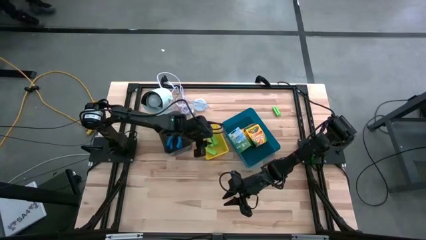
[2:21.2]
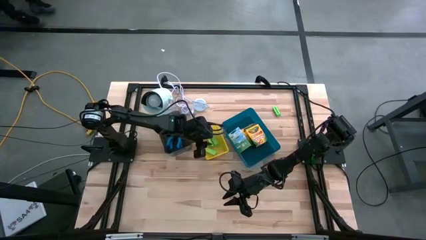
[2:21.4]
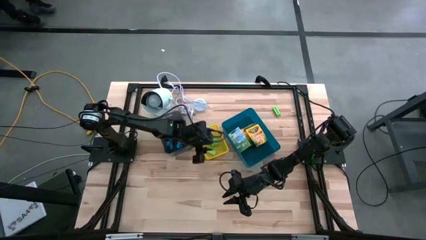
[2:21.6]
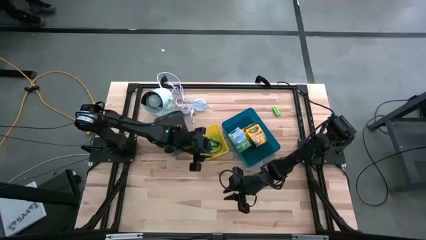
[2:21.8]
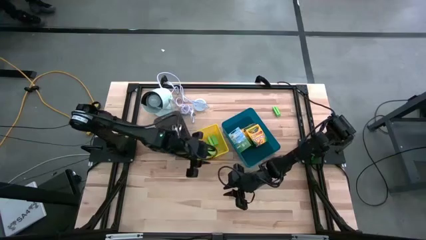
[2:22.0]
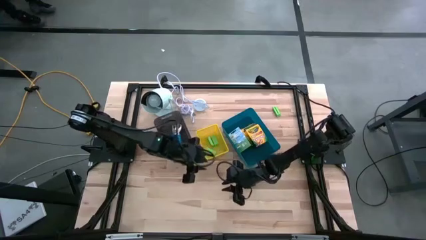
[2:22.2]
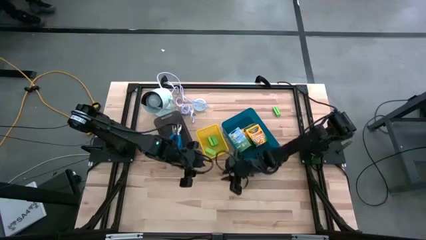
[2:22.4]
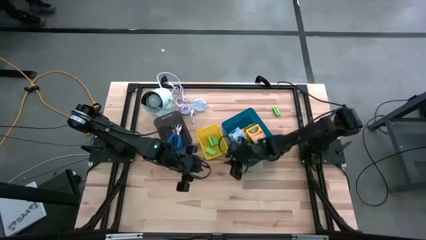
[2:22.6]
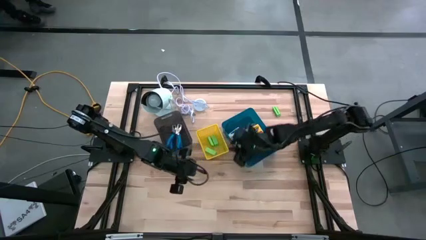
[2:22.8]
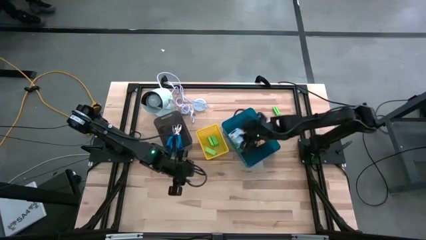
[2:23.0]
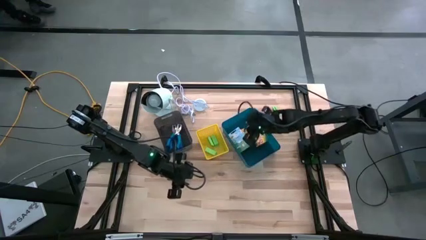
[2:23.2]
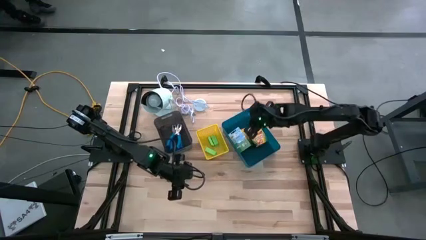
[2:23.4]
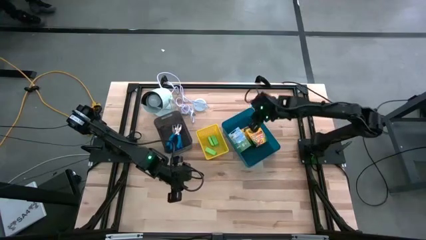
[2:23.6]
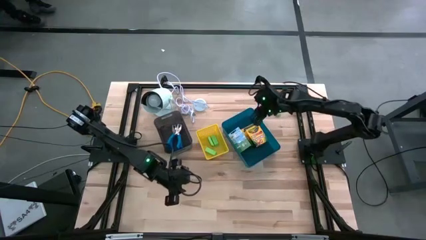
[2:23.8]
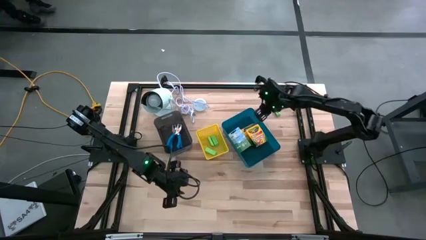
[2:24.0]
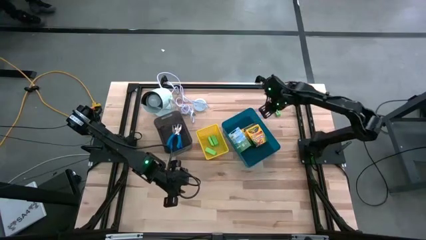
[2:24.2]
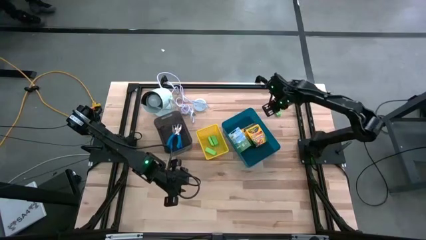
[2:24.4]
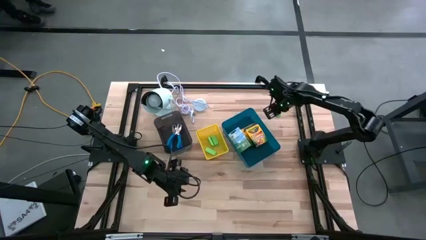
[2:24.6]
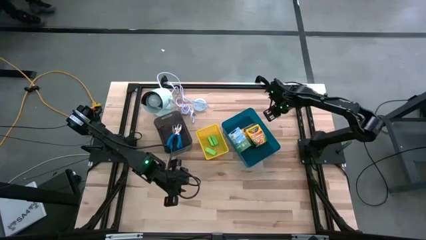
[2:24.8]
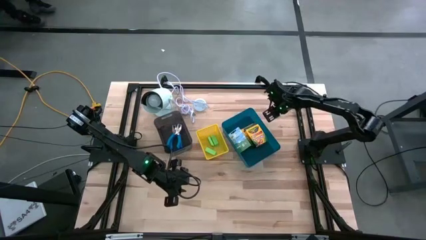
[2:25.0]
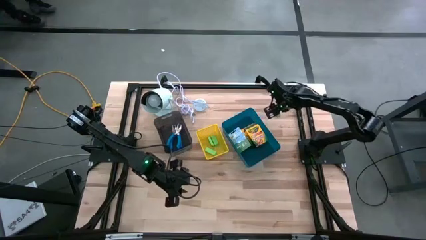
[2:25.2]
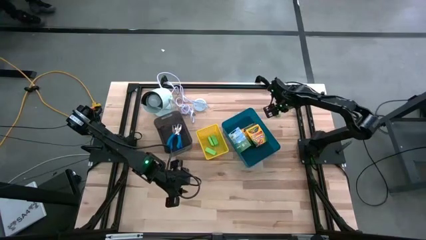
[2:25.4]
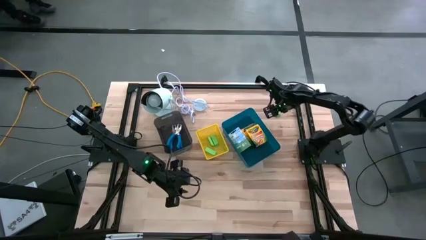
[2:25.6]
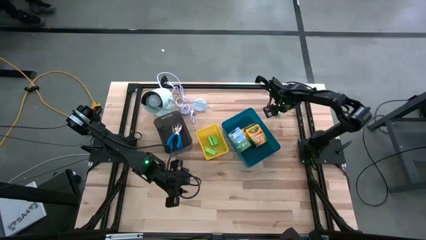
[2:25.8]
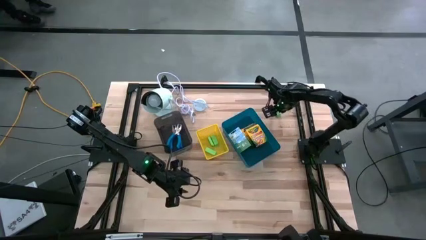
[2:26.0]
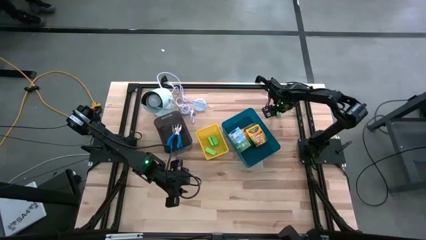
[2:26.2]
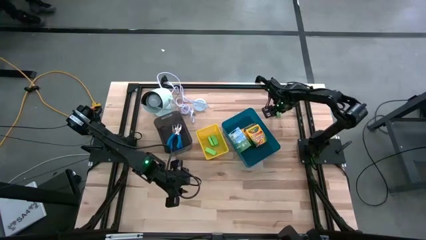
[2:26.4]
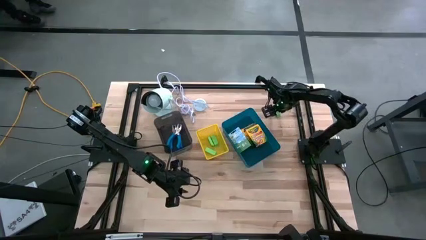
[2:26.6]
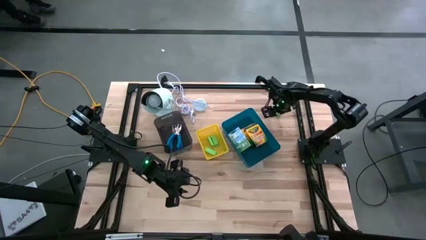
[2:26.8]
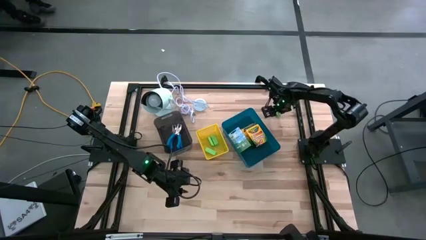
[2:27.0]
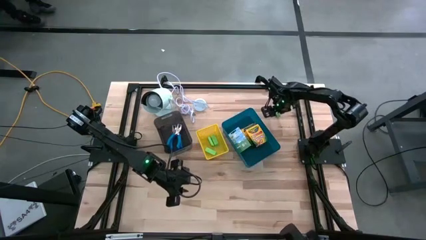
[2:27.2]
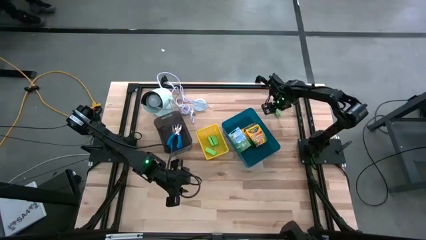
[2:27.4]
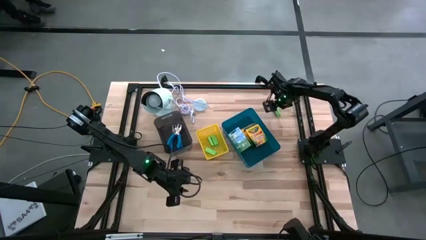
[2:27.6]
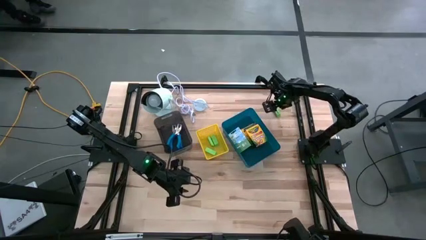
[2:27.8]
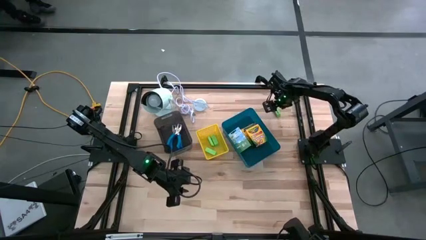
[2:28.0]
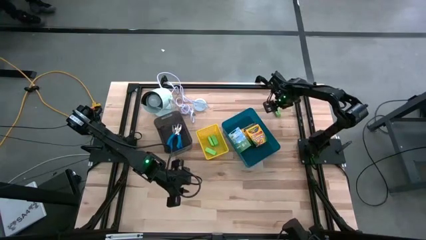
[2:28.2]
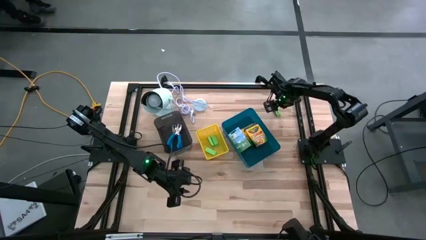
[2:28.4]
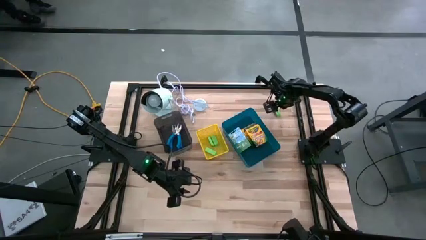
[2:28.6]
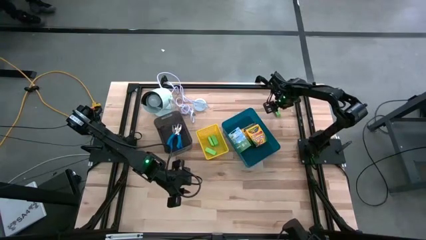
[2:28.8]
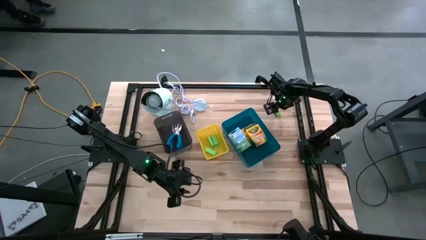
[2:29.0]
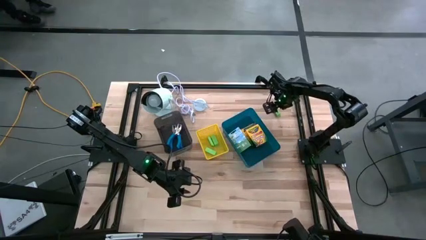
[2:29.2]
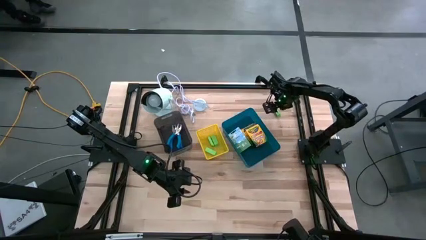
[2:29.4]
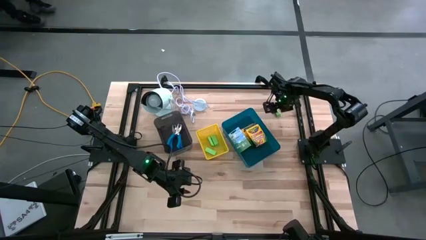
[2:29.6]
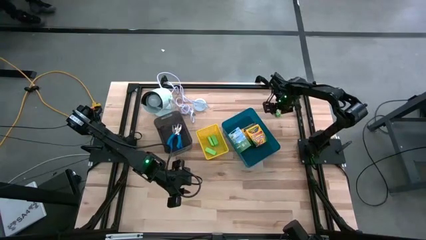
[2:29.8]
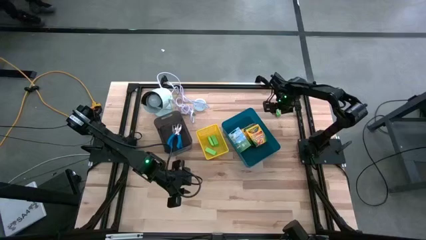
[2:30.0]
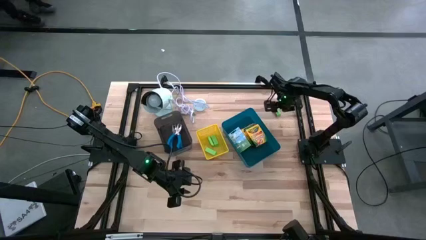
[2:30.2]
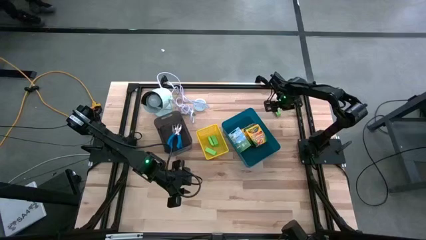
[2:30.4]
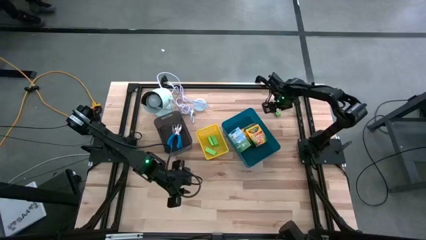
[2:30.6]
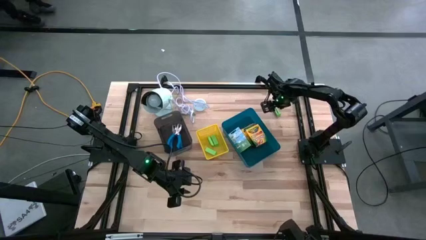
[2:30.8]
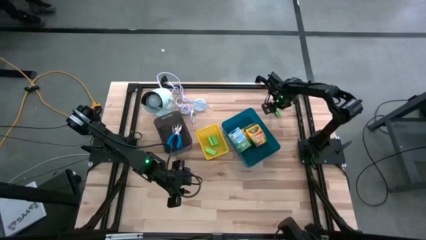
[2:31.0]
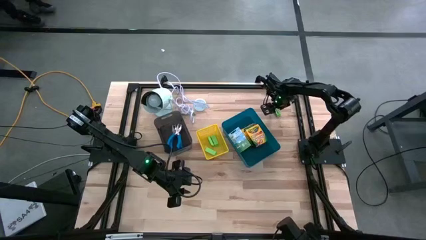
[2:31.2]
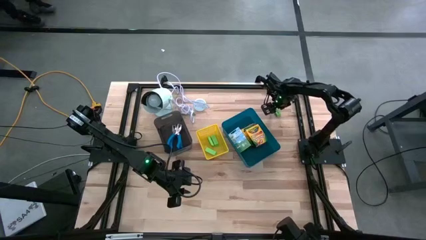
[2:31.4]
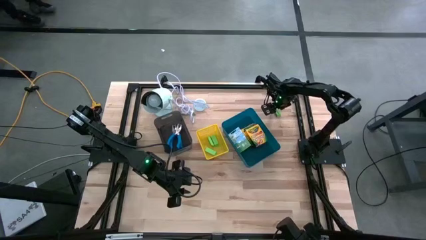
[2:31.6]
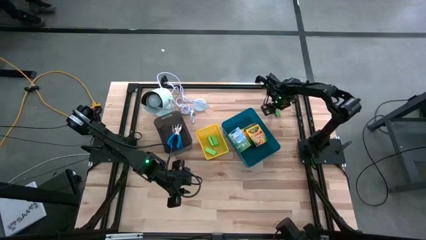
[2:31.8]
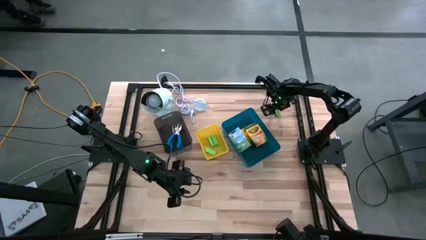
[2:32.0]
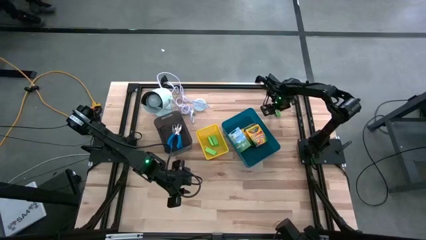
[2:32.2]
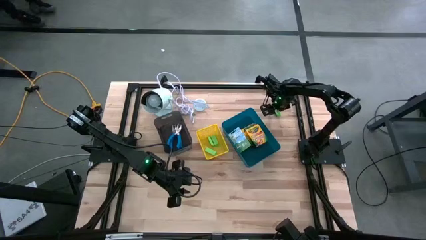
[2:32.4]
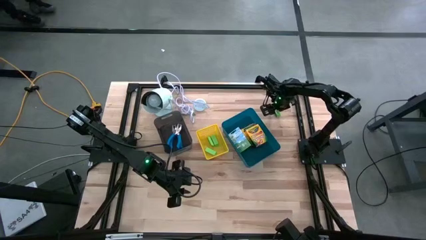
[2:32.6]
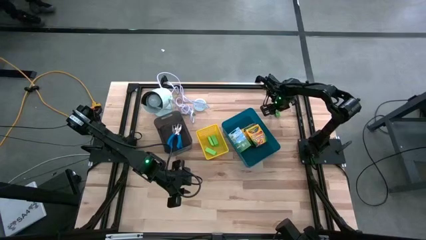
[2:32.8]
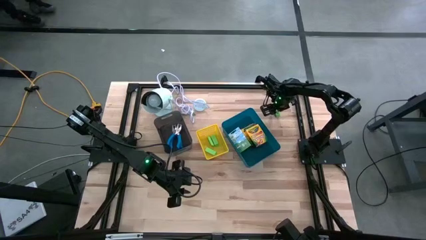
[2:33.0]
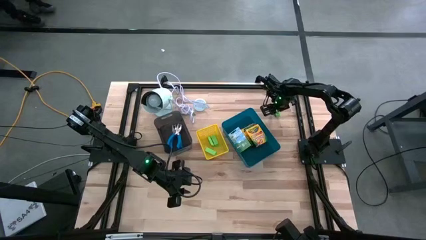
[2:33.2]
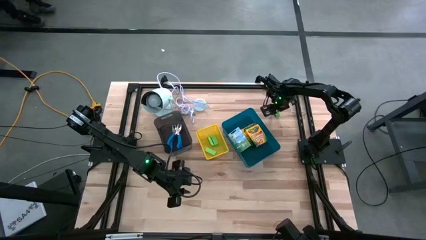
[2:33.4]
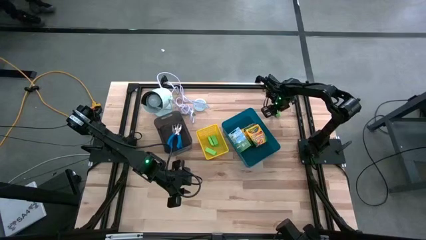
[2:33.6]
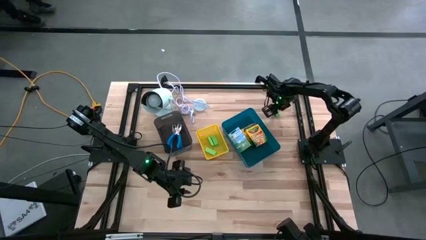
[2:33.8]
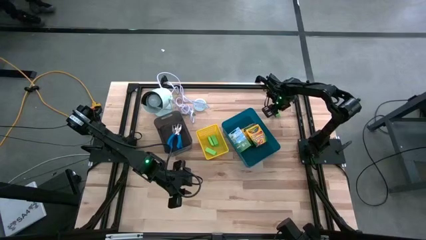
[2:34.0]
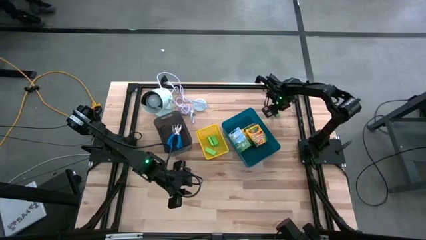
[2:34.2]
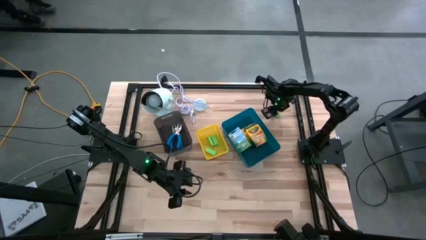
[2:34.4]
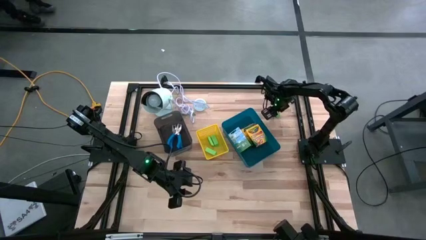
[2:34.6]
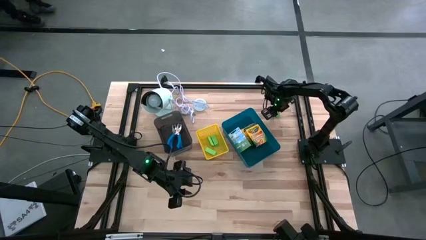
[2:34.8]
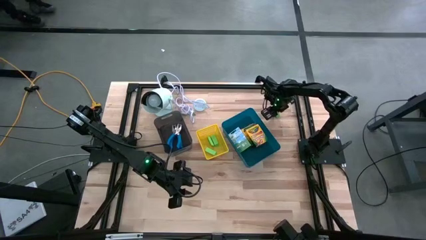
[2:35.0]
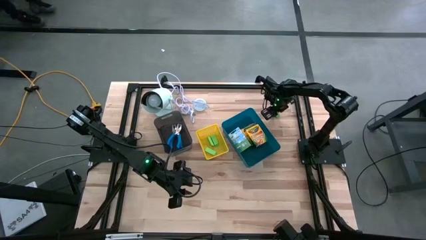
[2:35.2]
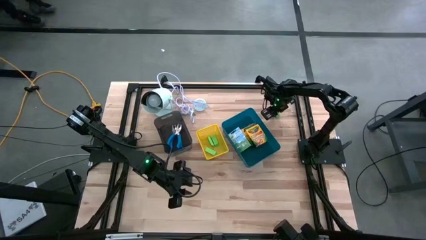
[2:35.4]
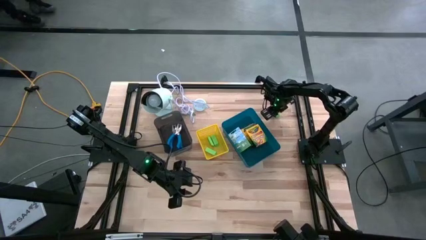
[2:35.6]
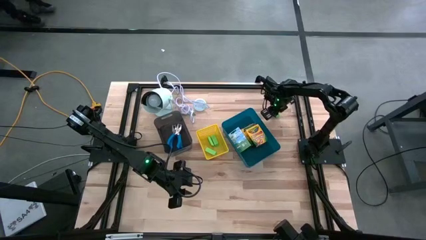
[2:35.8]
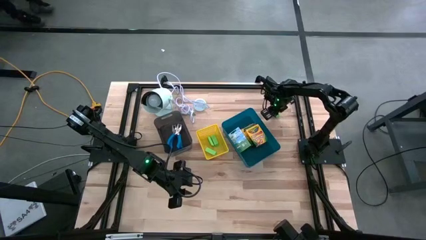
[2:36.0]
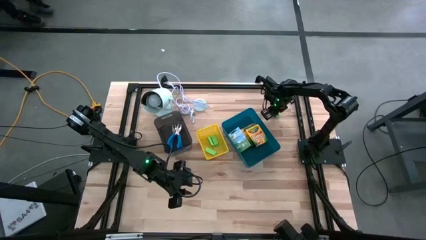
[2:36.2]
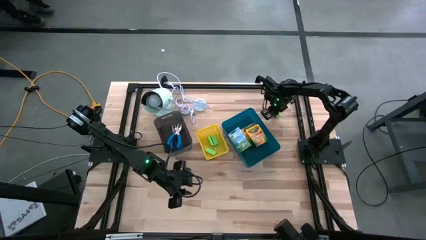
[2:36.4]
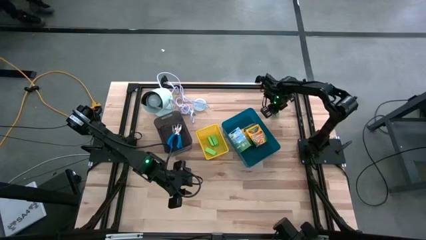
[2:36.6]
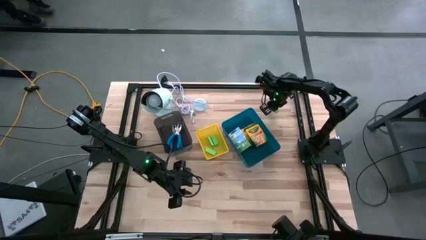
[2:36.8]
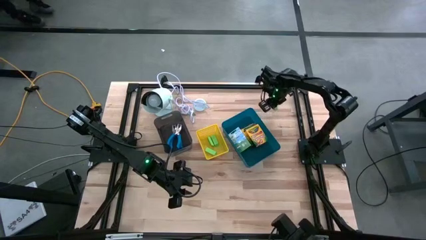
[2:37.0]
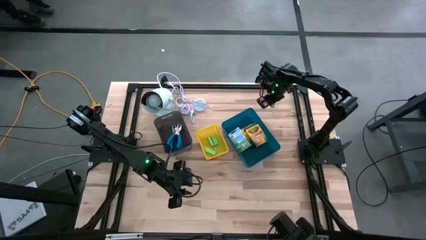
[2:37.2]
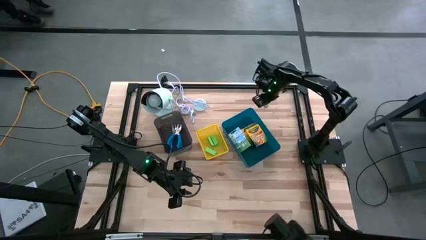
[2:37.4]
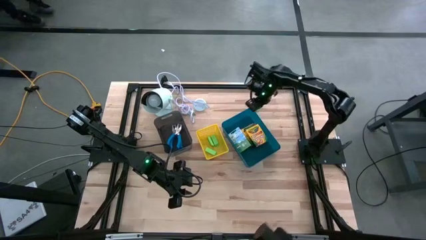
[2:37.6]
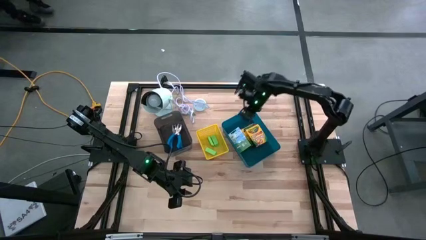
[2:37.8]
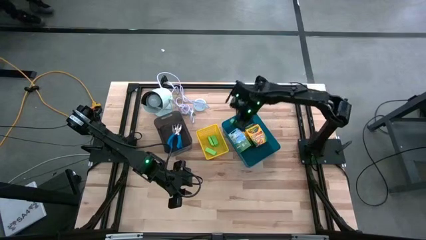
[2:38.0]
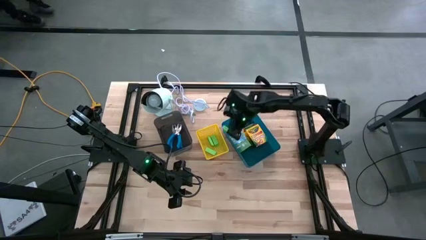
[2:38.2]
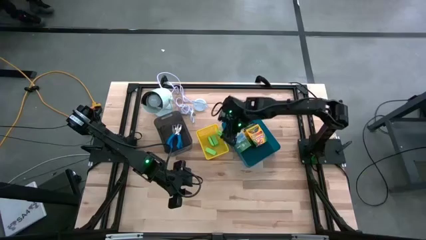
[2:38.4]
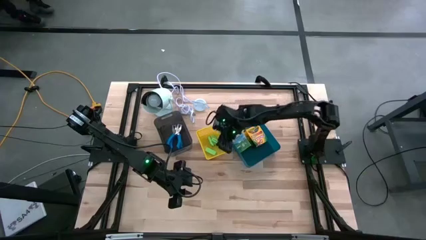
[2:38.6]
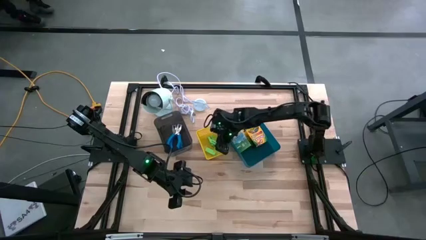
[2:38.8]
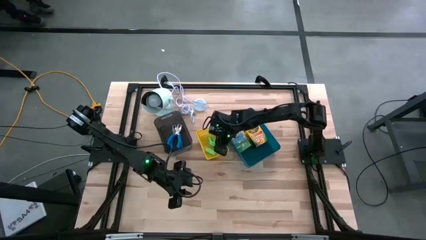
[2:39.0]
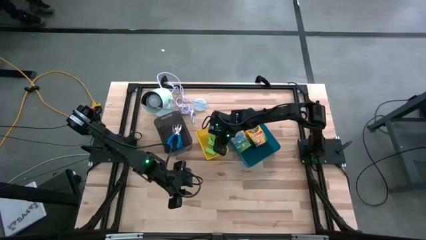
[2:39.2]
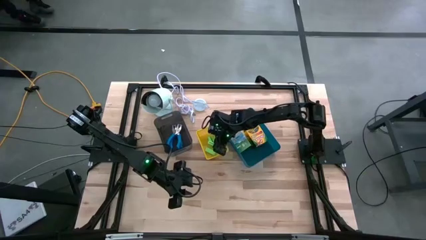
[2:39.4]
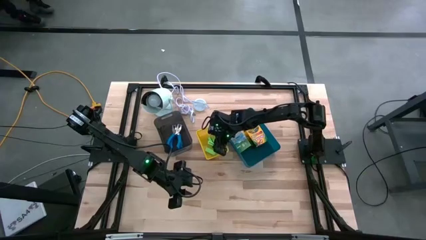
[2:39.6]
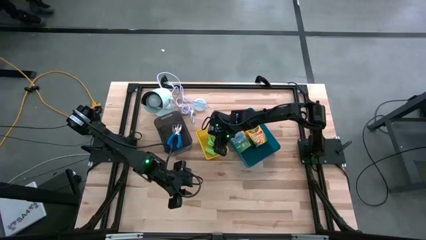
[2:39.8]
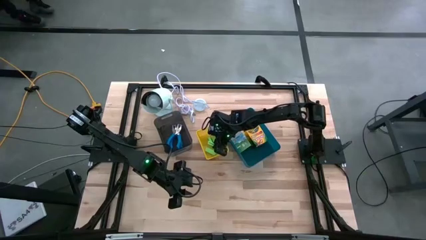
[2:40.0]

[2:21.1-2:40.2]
Task: Pick & Place School Supplies
Put the green eraser into the yellow bin
